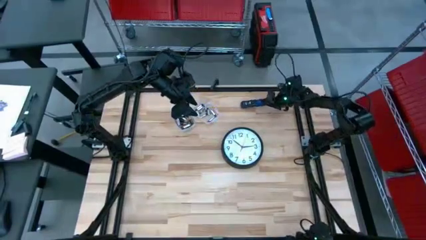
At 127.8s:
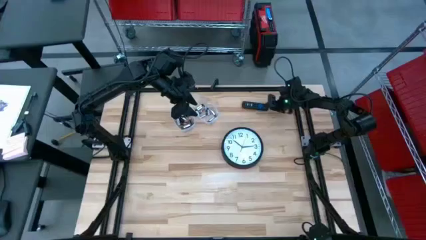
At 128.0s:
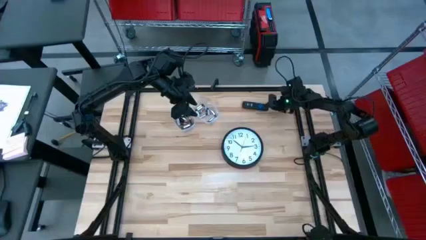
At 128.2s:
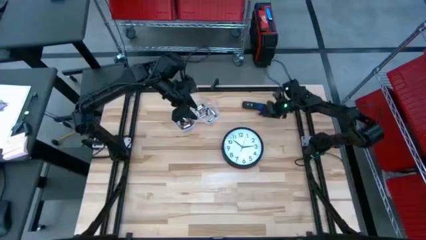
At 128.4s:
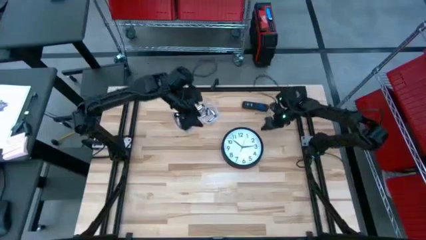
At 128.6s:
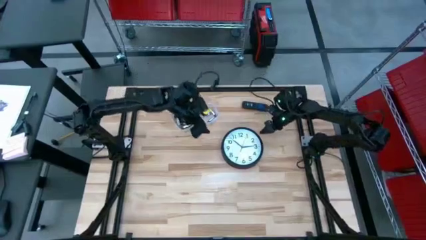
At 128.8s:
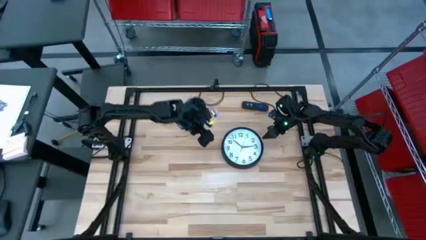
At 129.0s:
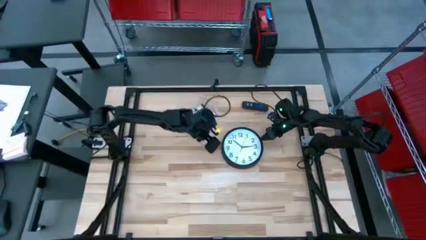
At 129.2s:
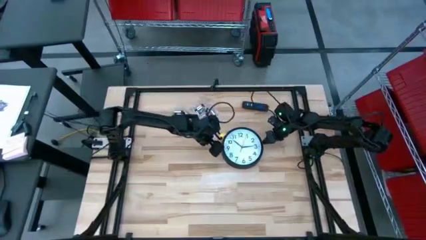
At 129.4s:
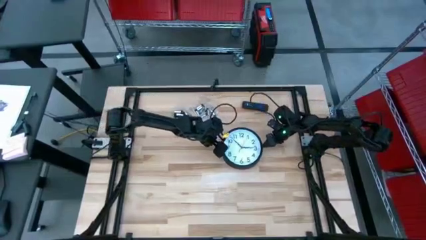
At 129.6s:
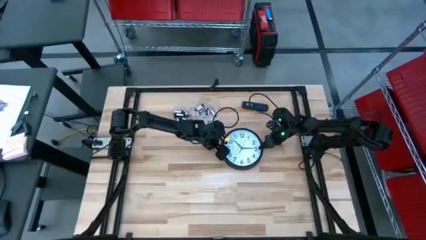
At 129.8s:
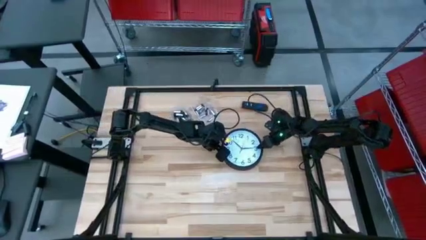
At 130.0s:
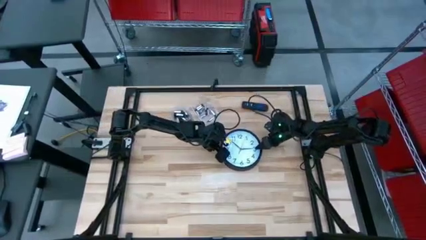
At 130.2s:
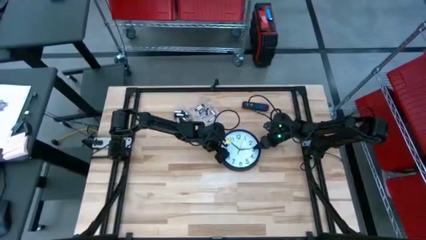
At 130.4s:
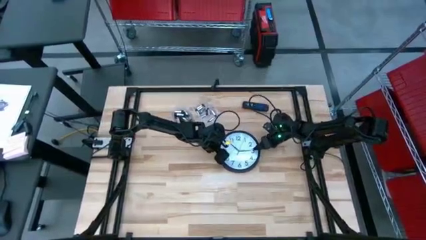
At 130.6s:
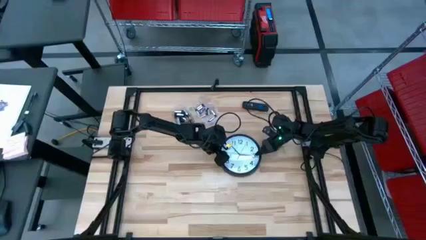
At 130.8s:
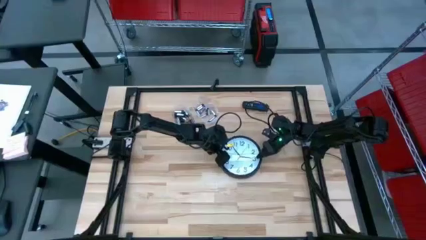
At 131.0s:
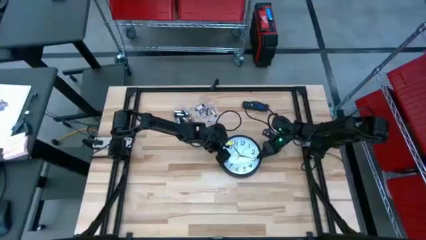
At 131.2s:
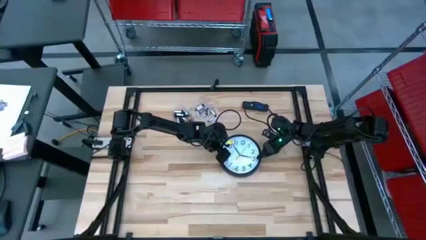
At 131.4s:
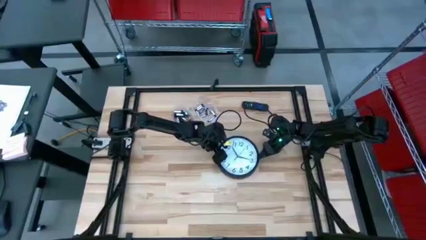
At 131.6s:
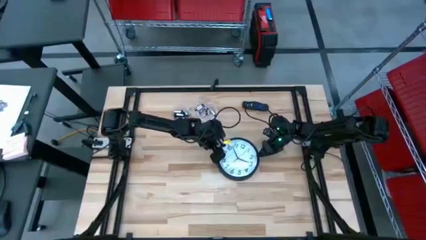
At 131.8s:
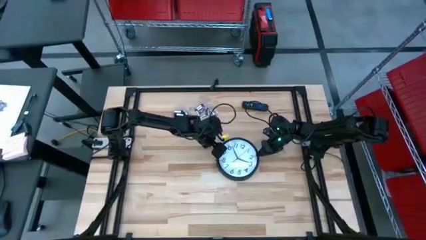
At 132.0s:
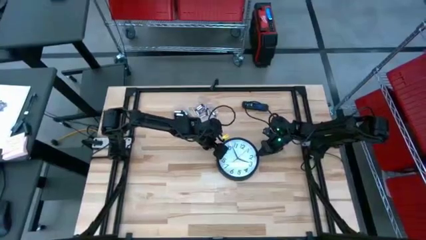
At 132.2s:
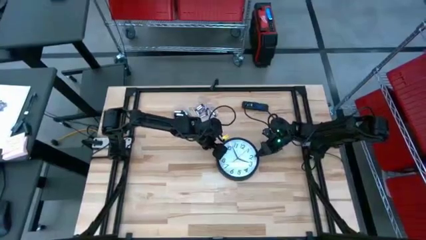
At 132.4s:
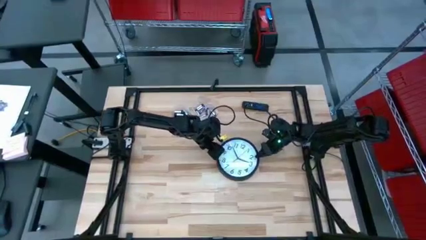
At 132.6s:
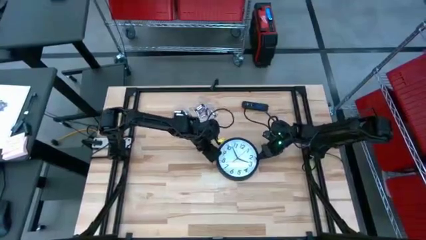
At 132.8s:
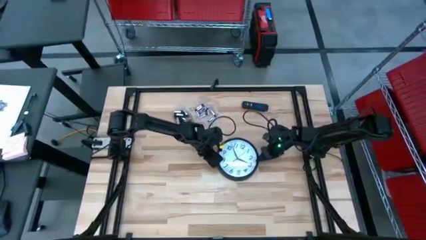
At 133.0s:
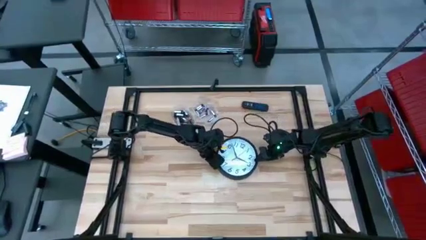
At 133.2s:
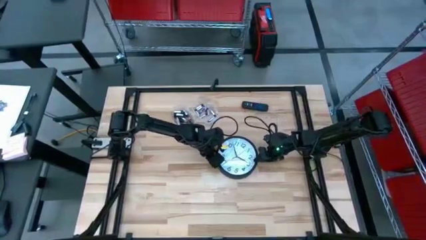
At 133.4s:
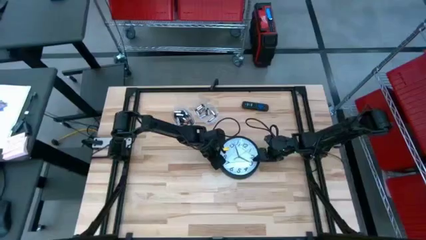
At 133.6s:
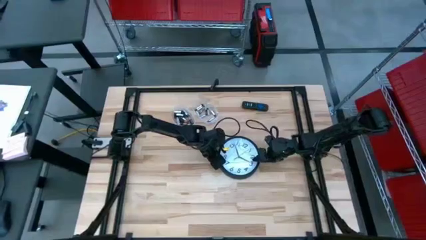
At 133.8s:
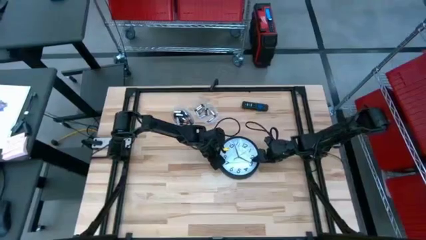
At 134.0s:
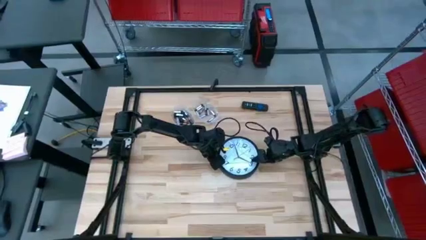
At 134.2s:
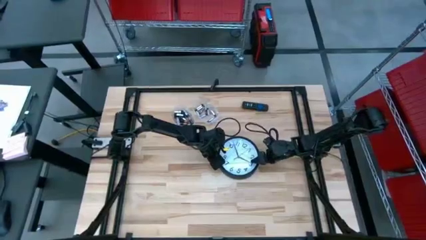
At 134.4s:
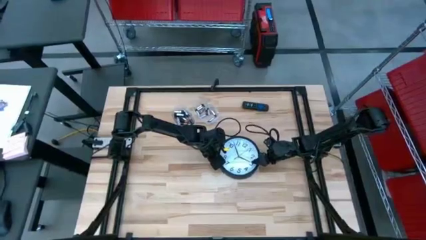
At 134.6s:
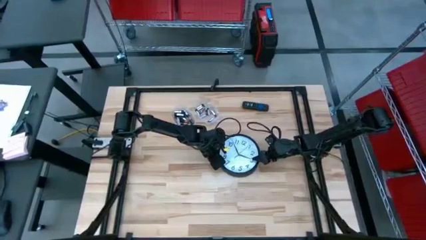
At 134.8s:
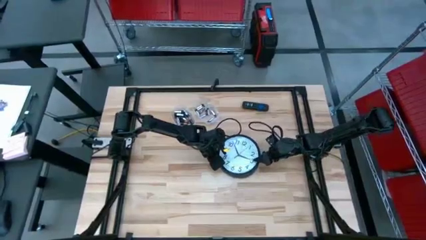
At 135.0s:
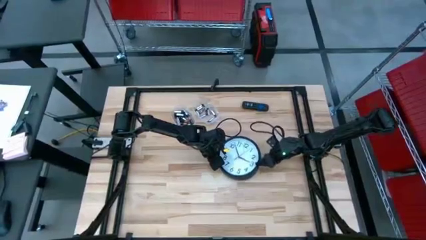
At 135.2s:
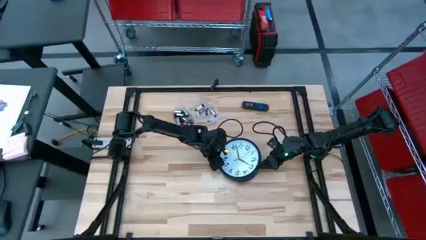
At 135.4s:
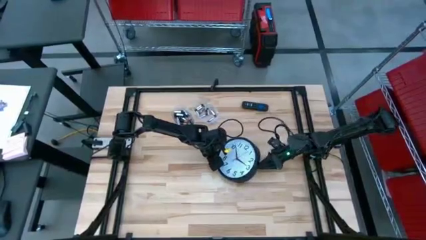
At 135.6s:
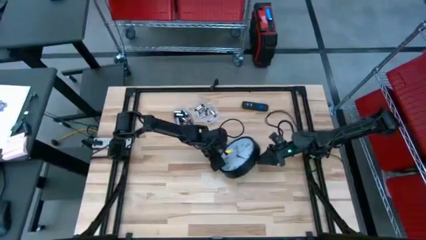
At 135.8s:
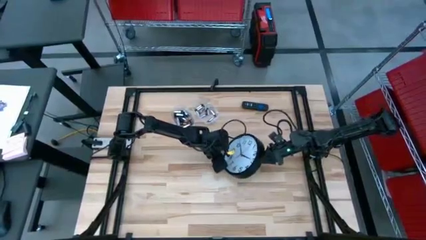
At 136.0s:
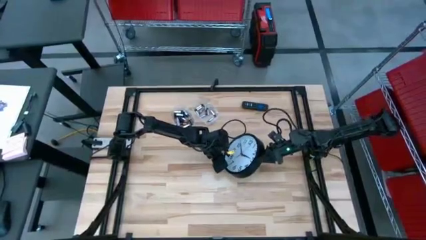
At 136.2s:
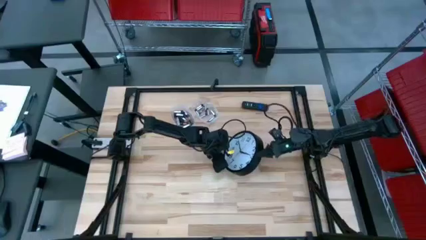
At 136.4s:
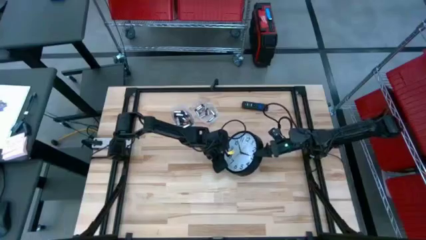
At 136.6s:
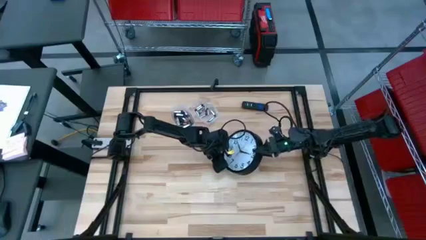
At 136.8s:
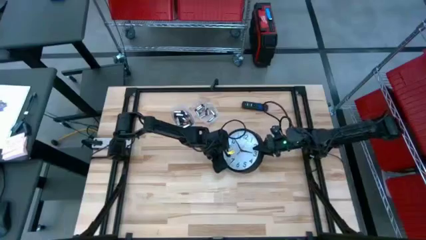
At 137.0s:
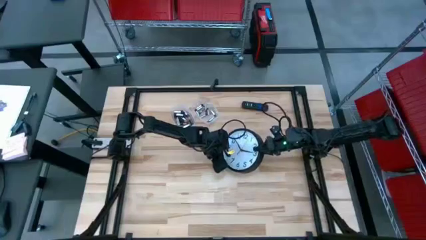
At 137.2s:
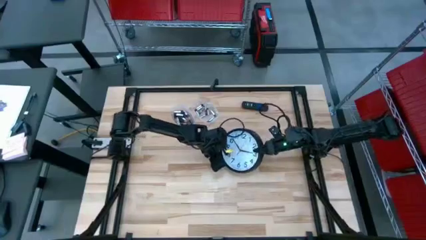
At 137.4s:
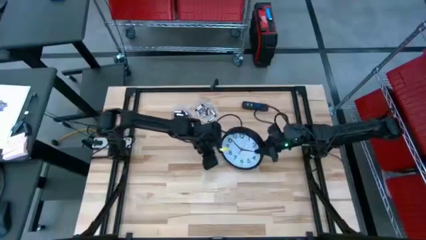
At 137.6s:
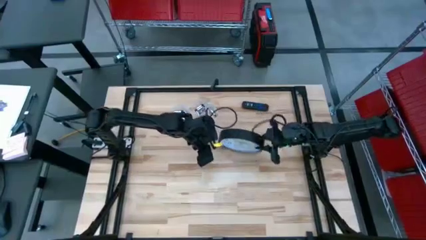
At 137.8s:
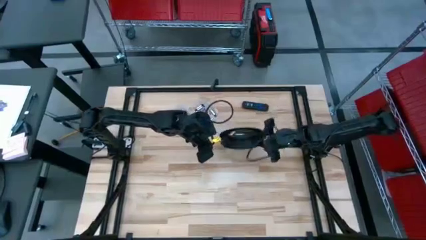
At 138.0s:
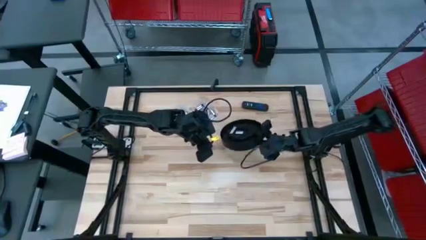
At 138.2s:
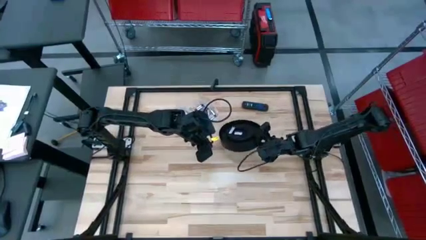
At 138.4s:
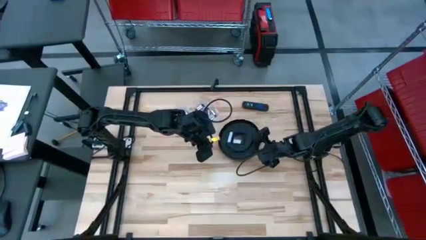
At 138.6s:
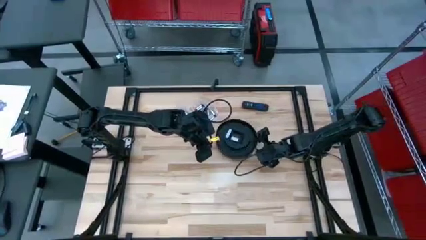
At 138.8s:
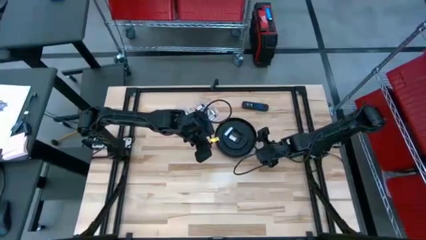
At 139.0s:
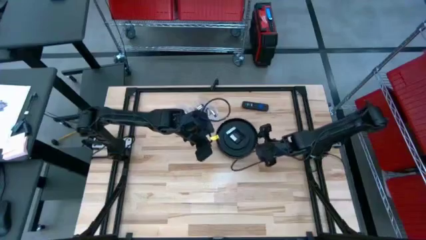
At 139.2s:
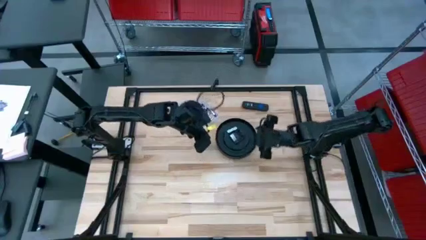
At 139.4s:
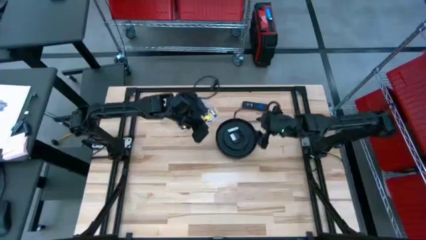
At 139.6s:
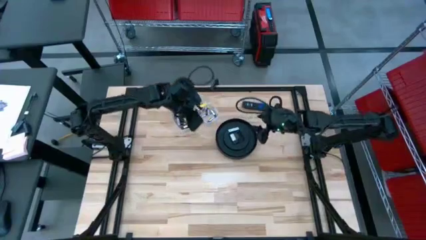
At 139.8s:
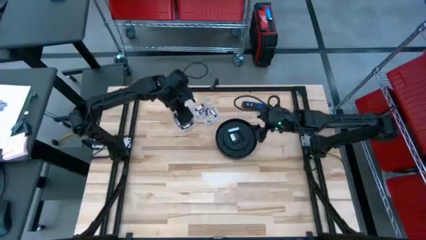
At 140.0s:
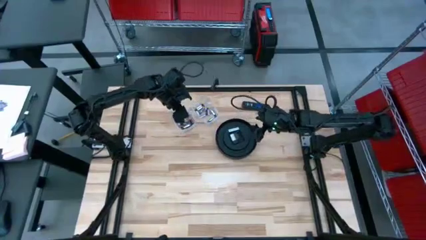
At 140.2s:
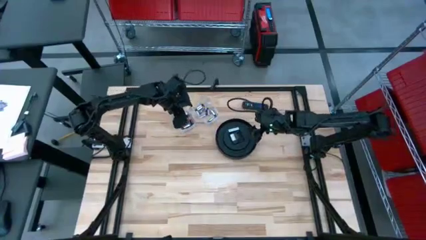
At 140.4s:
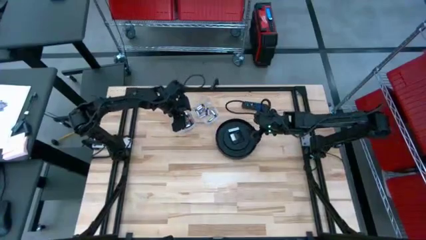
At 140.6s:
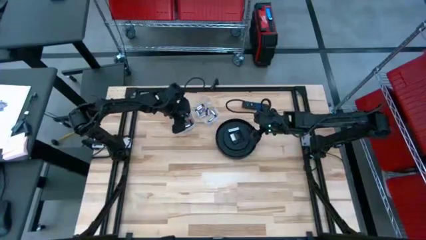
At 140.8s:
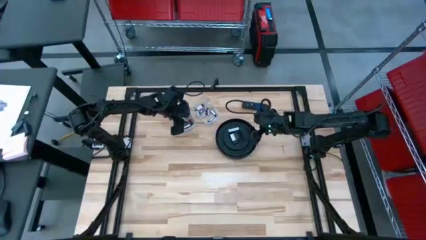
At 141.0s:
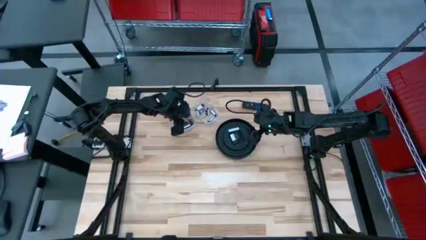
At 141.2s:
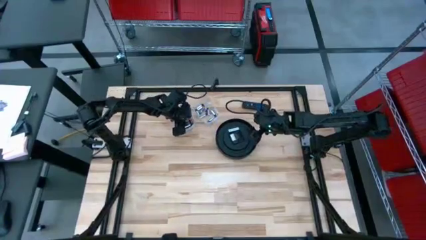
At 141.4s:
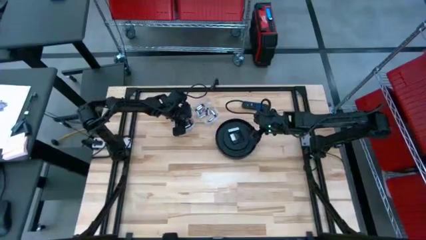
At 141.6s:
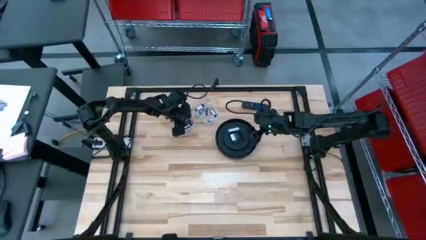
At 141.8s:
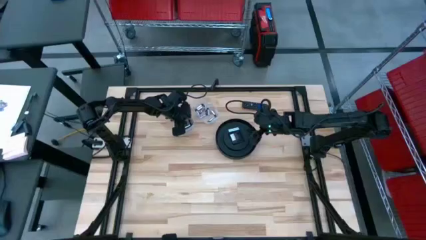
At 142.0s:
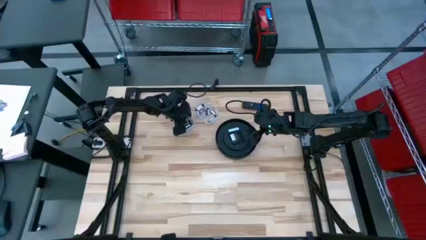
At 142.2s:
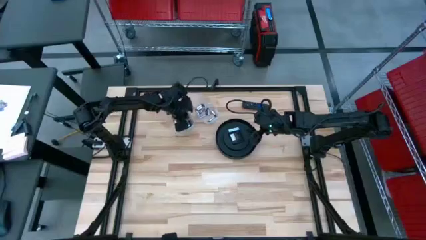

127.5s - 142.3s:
Task: Insert battery
Insert the black battery into the wall clock
